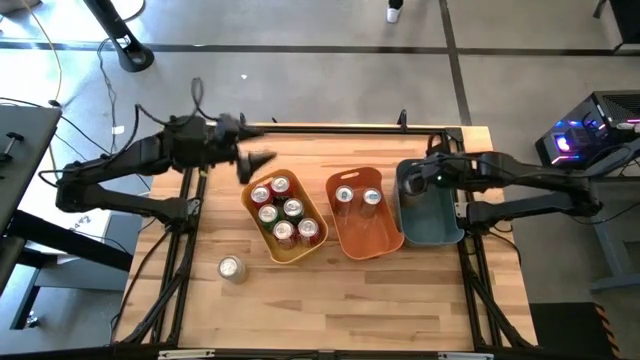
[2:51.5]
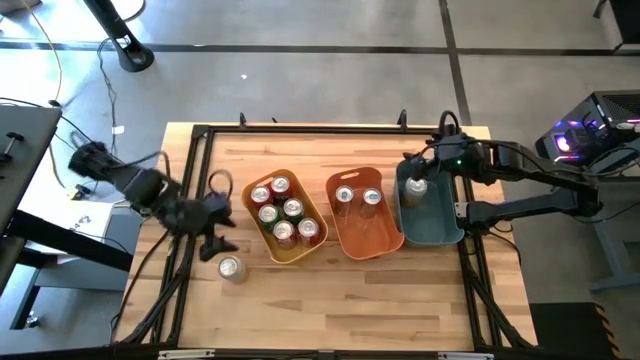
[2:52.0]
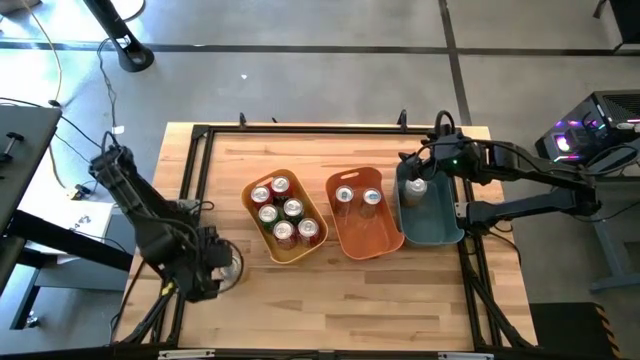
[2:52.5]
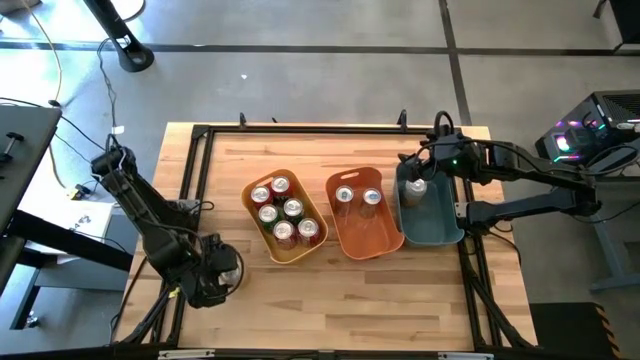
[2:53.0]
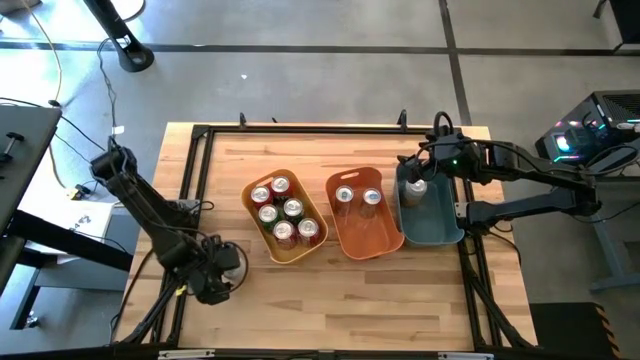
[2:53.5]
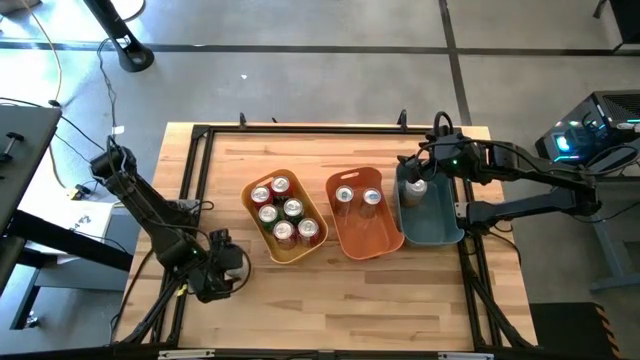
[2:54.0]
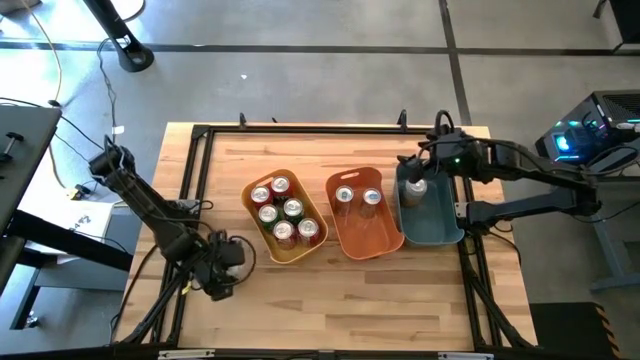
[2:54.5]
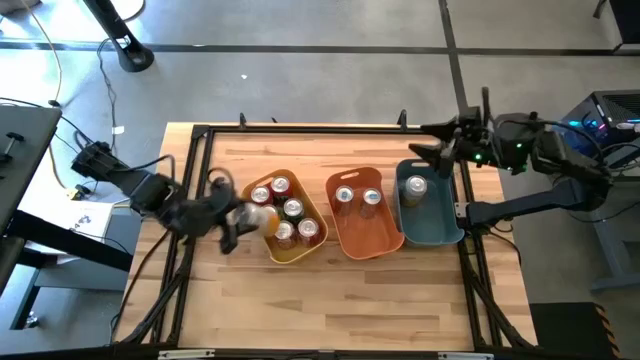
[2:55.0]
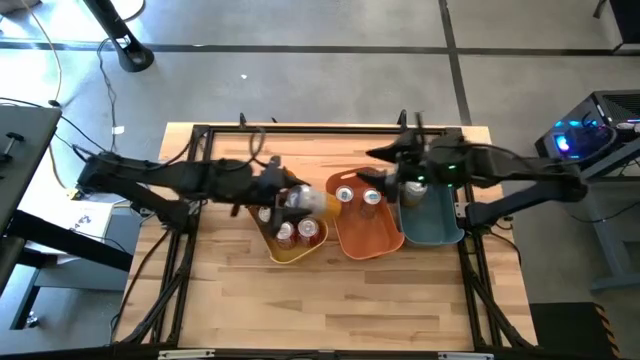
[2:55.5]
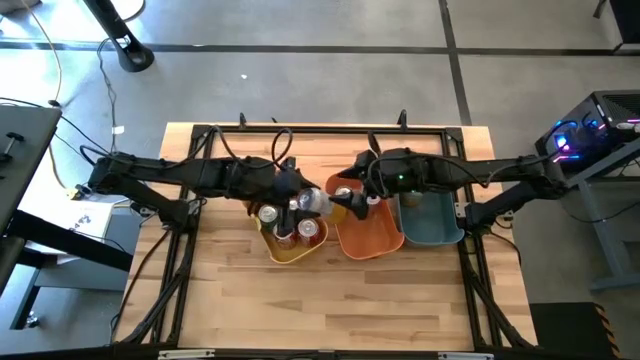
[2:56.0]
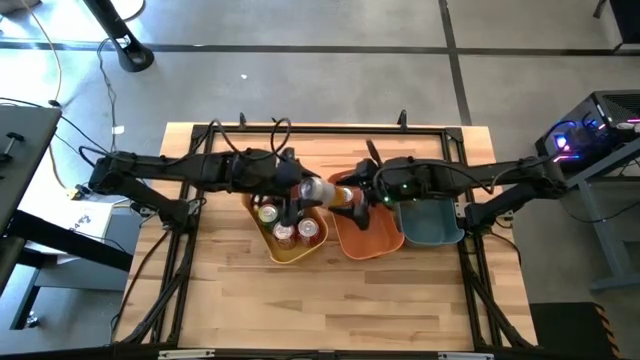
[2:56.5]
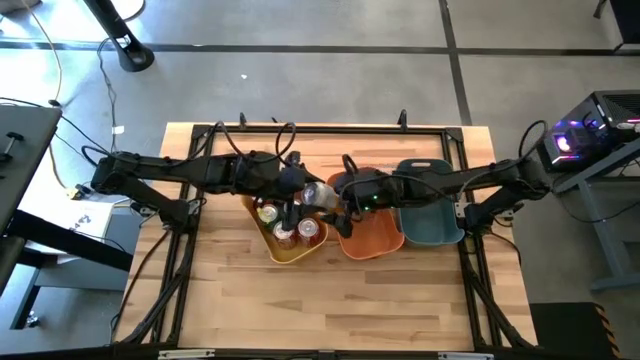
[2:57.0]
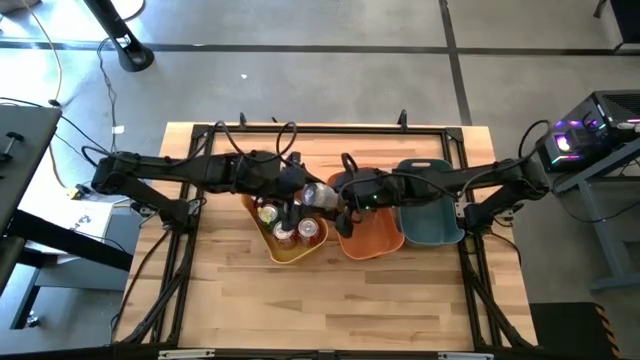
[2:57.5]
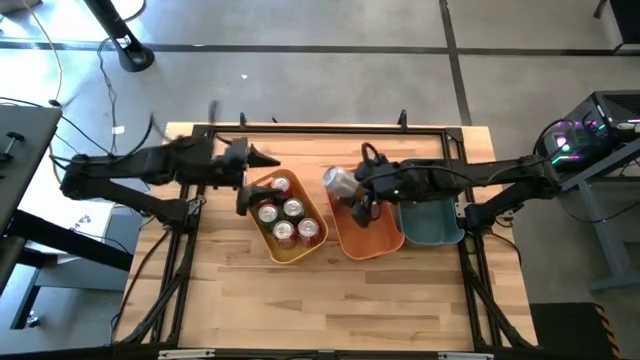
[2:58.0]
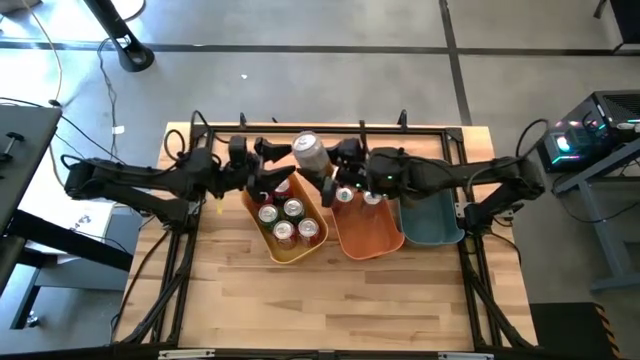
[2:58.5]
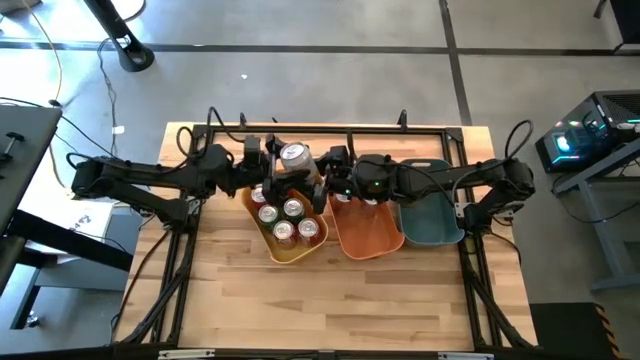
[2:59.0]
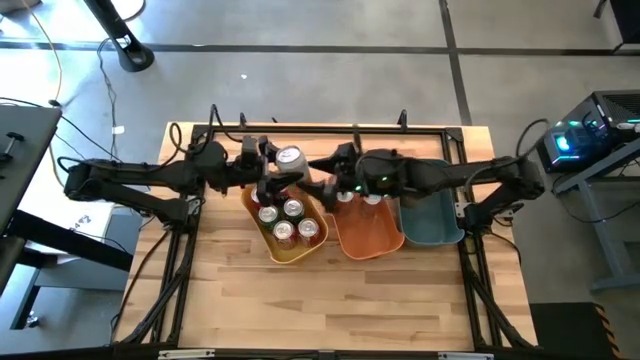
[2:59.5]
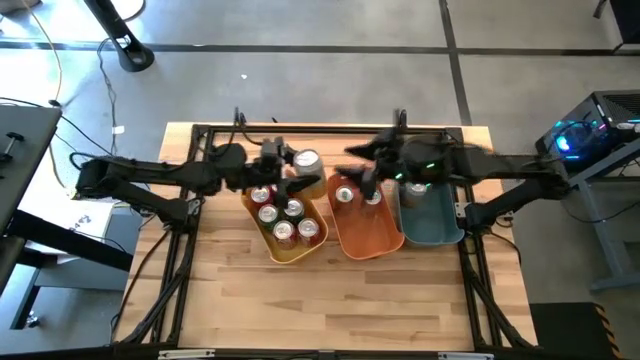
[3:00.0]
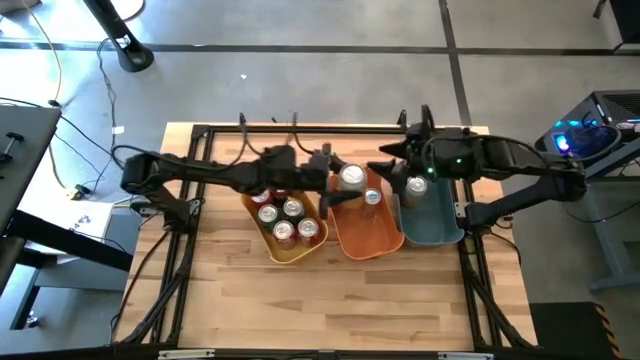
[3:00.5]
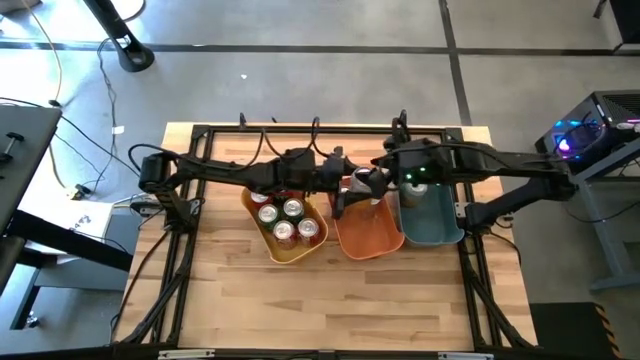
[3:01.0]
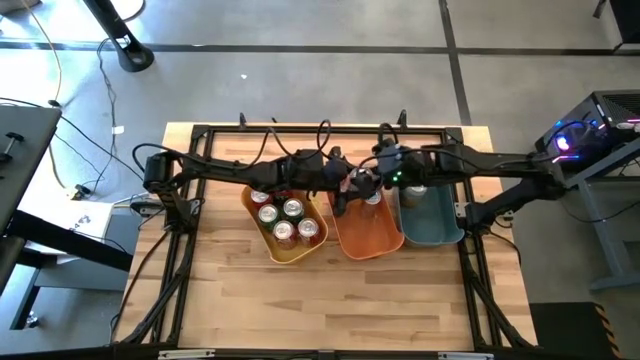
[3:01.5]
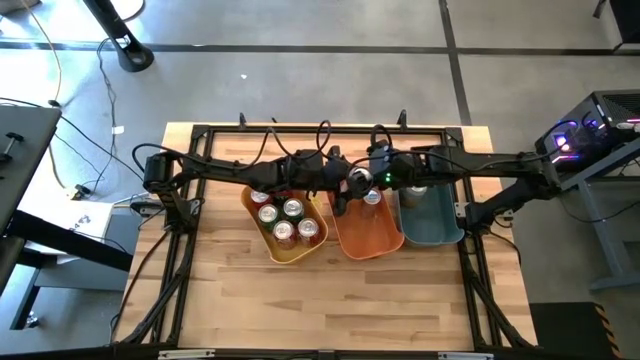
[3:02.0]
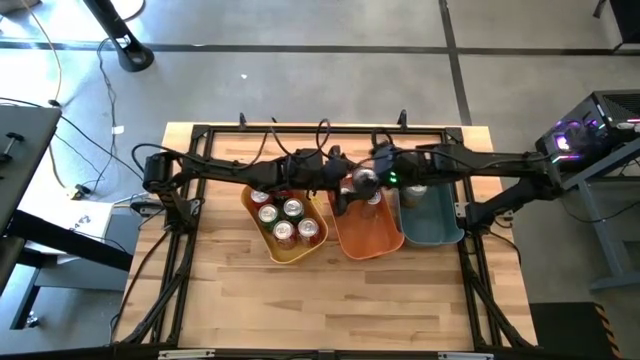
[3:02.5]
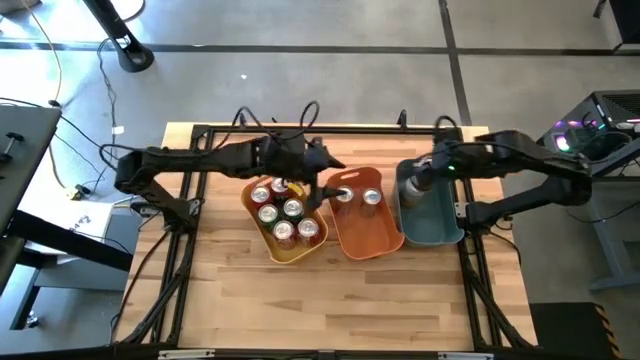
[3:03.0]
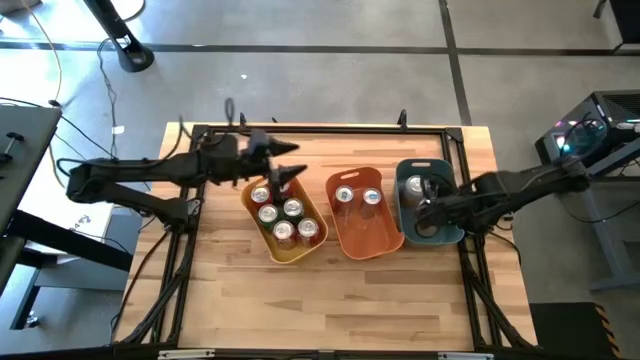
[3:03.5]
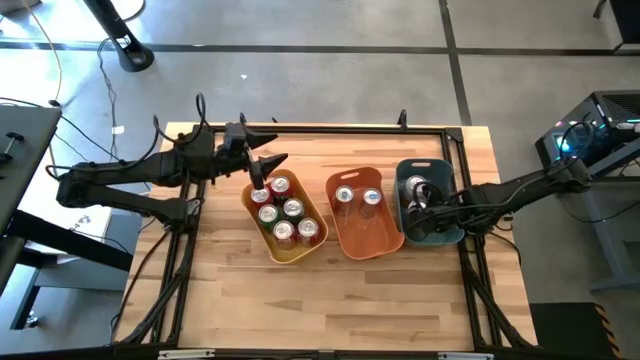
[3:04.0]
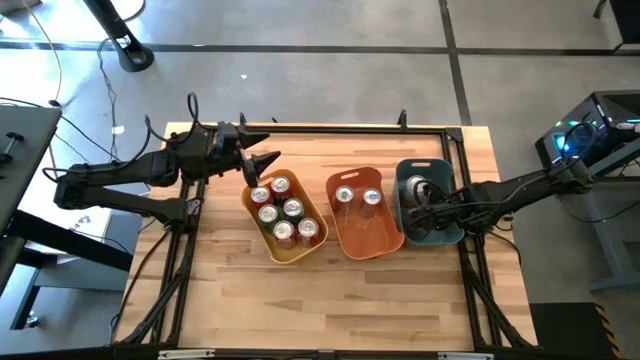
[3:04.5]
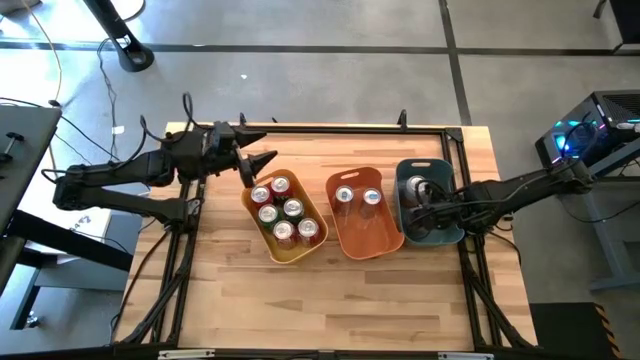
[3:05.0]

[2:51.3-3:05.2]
Task: Sort soda cans
Put the yellow-white soda can into the blue bin

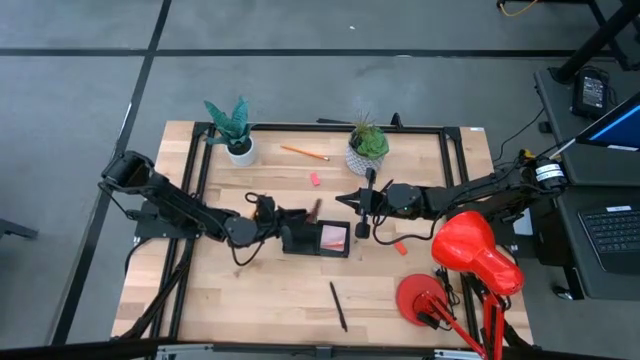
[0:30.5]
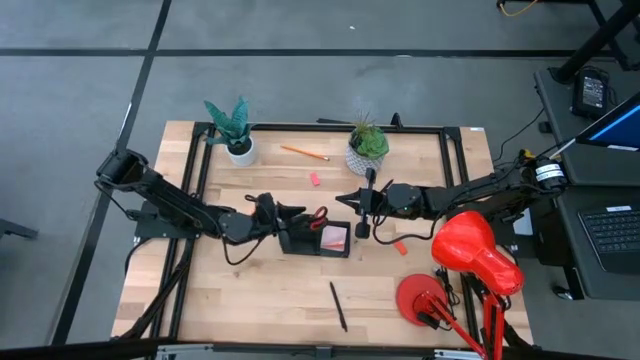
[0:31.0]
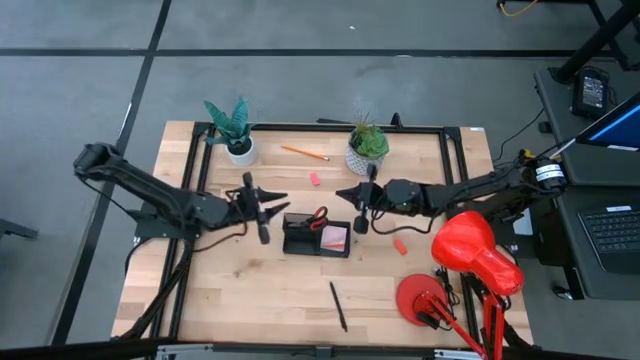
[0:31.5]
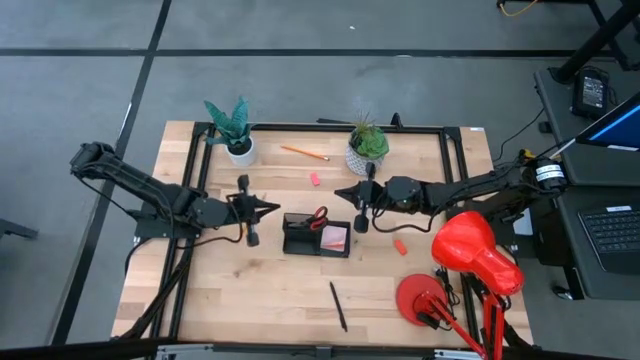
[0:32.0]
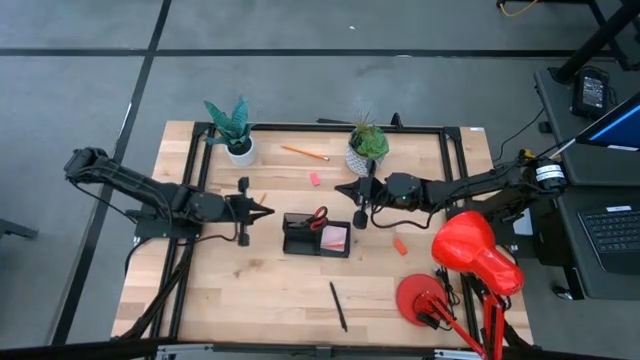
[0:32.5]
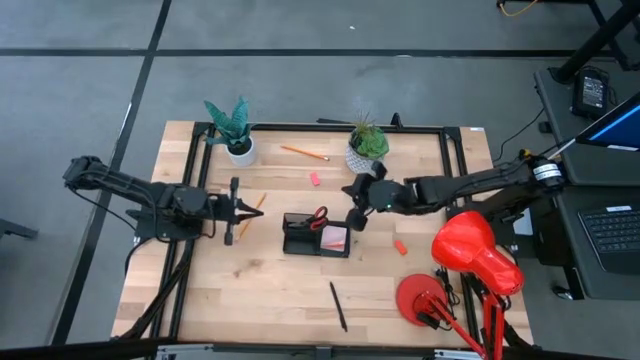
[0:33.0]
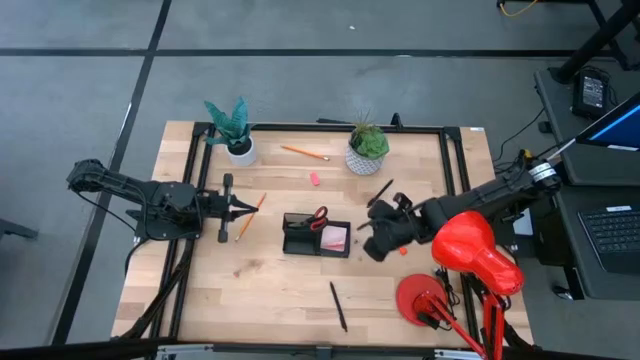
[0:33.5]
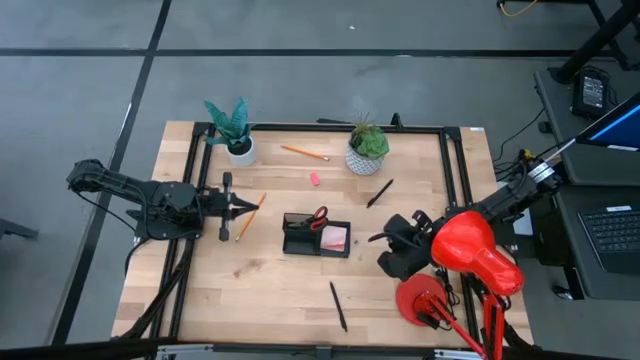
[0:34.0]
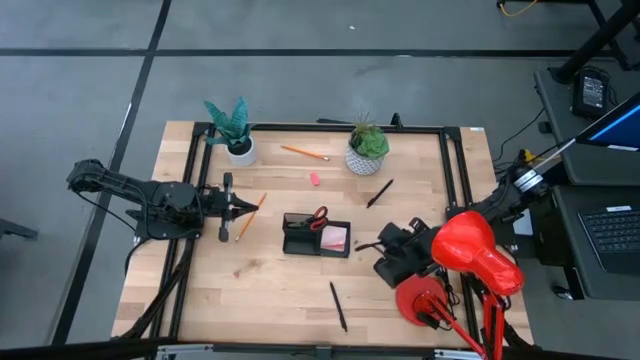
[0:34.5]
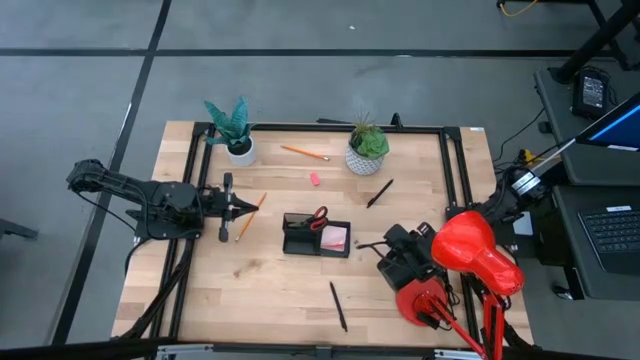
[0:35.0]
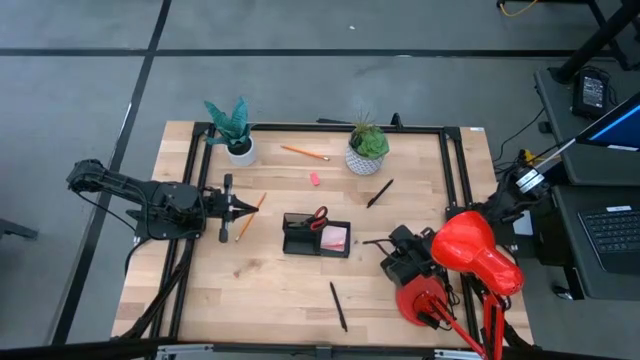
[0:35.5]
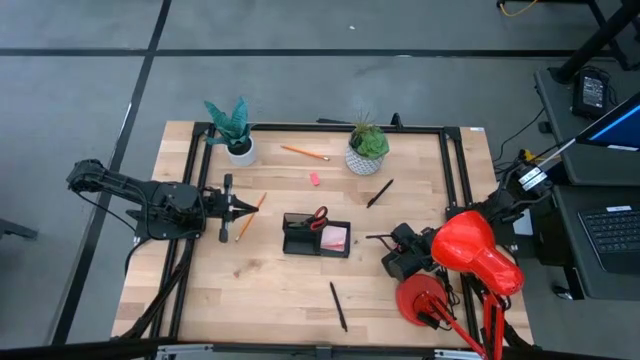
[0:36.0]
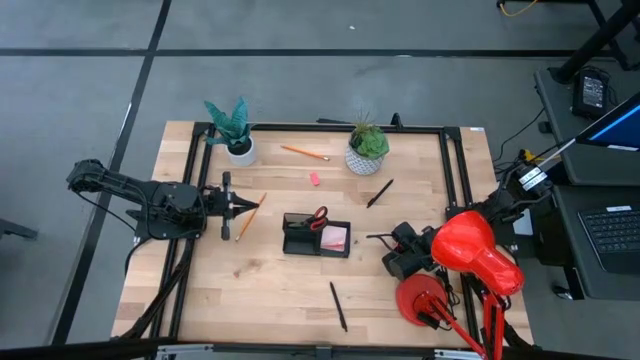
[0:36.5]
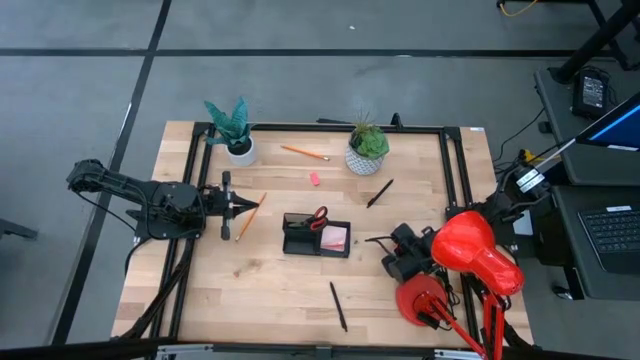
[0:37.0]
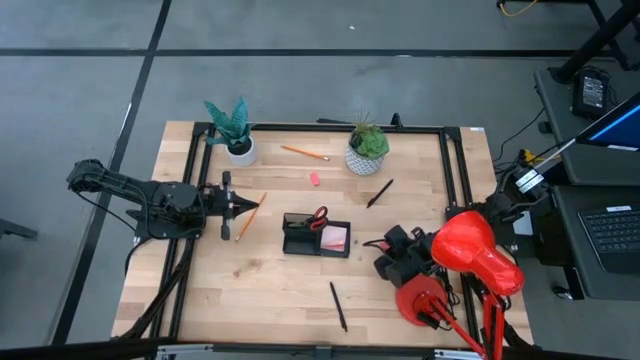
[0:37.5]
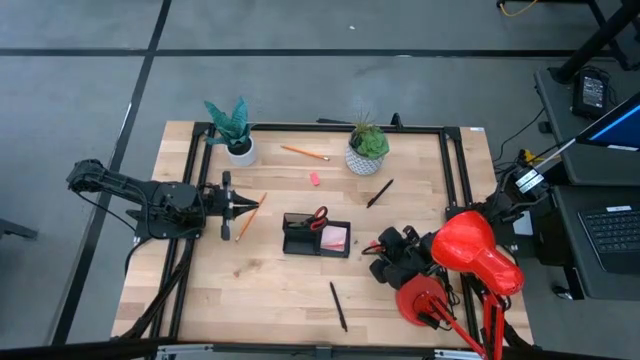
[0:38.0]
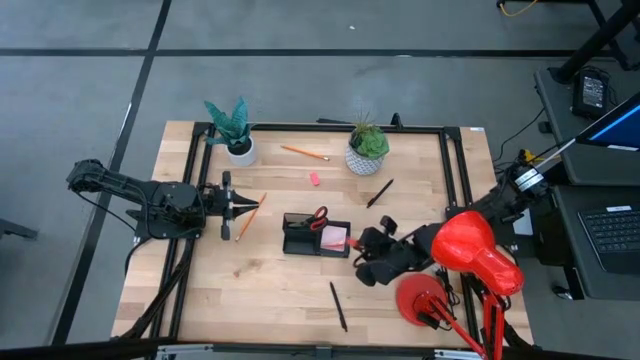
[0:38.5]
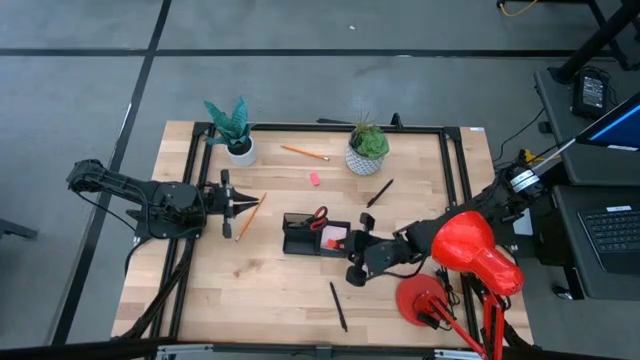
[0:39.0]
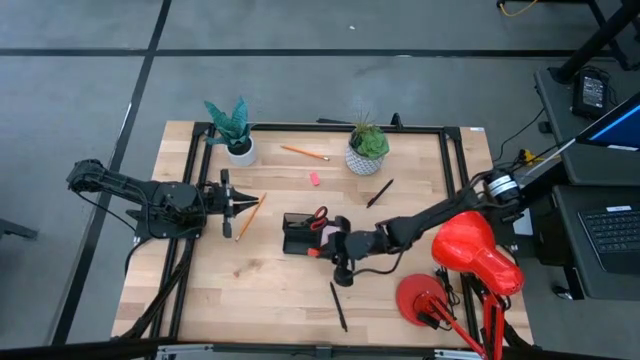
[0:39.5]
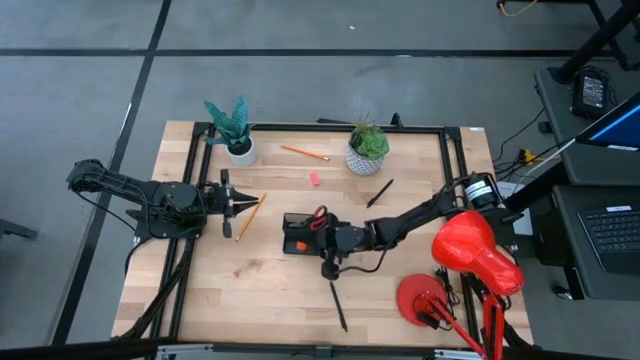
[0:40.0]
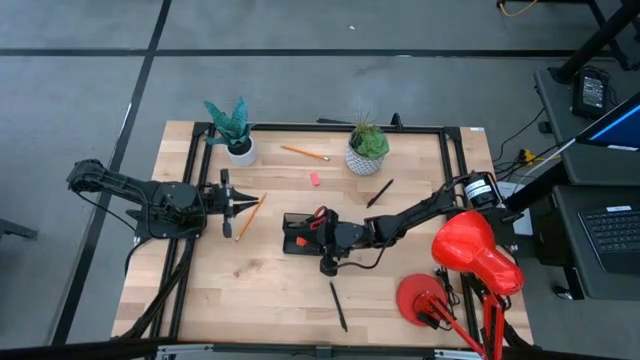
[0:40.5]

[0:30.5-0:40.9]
Task: Pick and place office supplies into organizer
Put the orange eraser into the desk organizer
